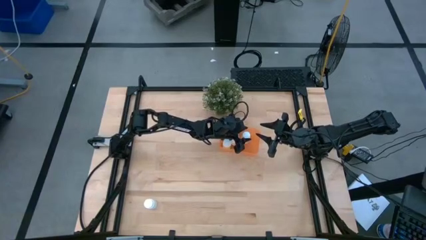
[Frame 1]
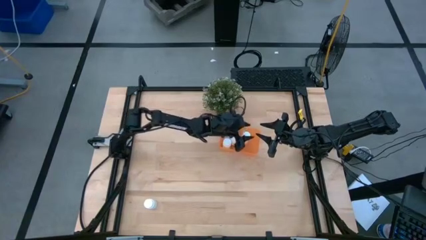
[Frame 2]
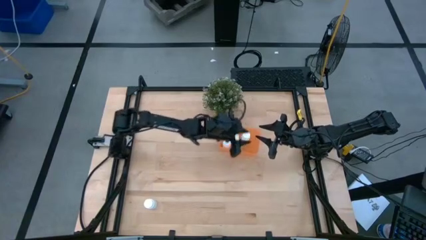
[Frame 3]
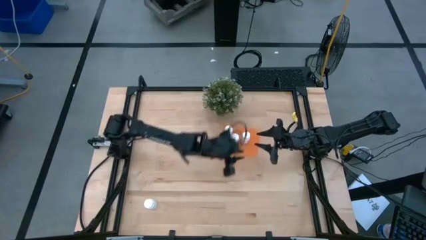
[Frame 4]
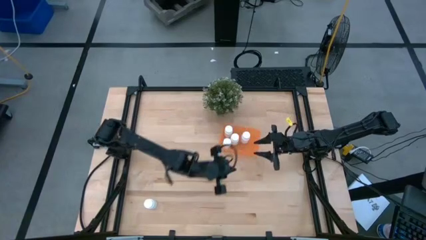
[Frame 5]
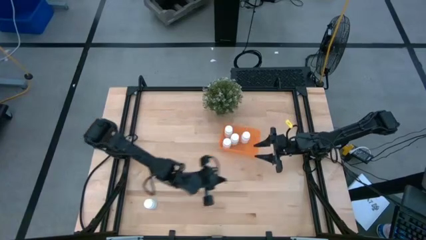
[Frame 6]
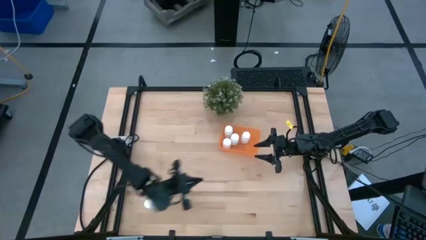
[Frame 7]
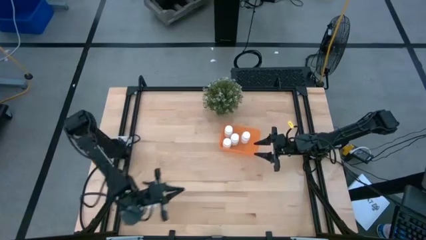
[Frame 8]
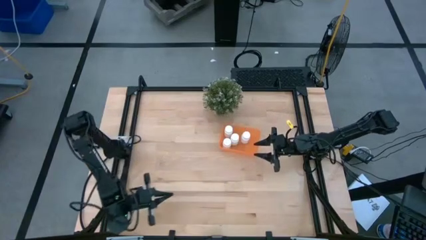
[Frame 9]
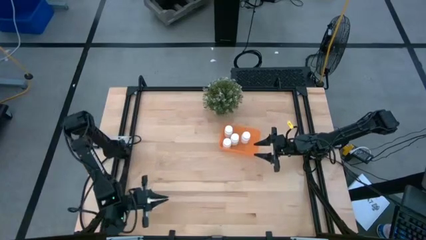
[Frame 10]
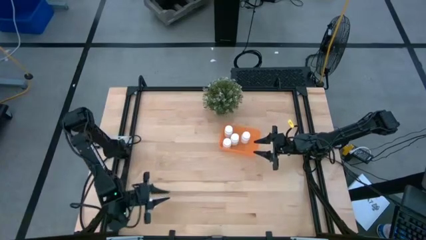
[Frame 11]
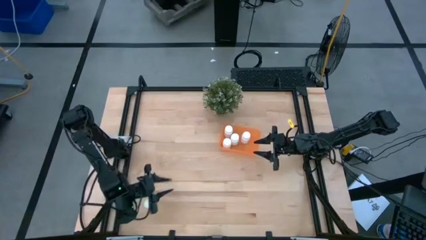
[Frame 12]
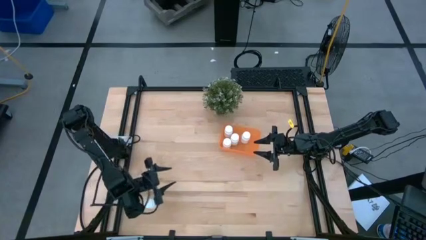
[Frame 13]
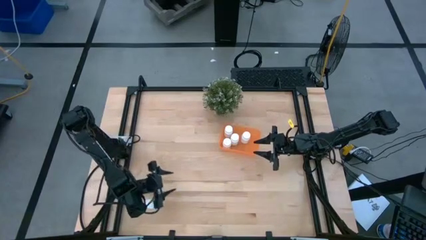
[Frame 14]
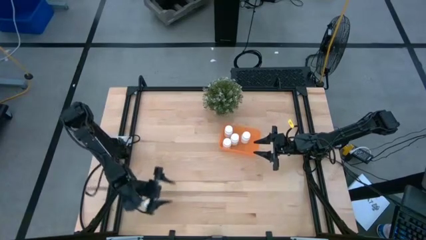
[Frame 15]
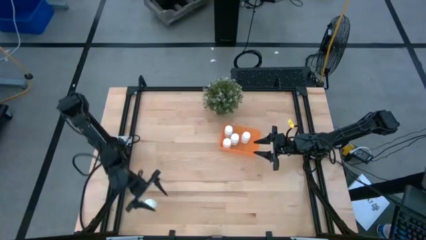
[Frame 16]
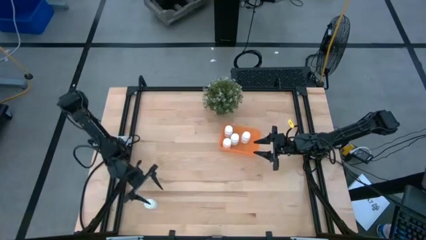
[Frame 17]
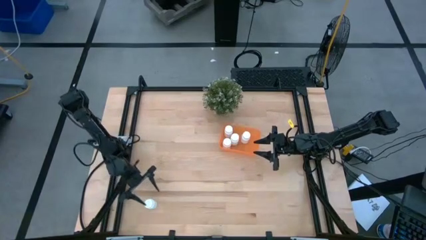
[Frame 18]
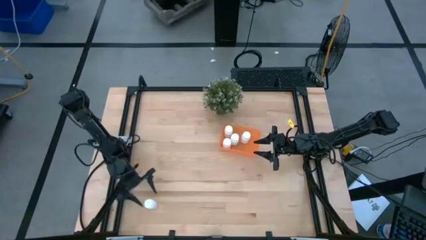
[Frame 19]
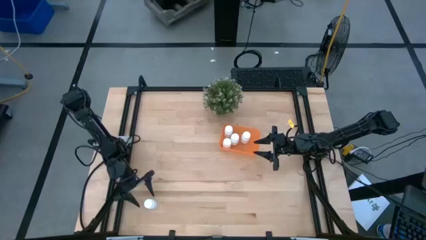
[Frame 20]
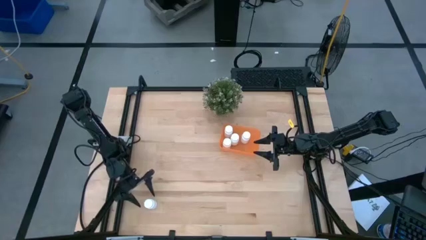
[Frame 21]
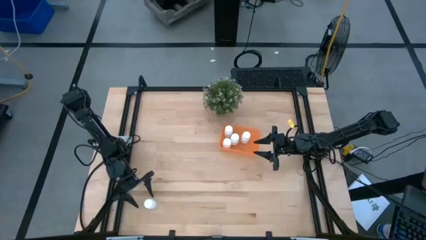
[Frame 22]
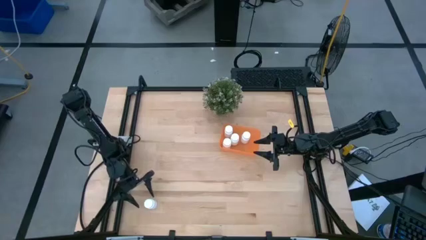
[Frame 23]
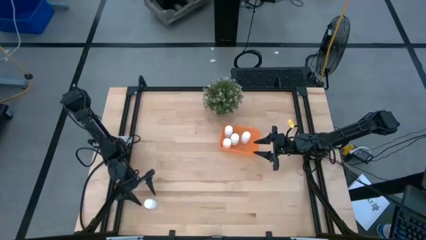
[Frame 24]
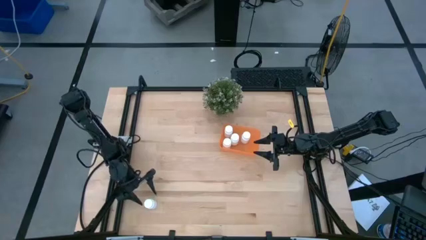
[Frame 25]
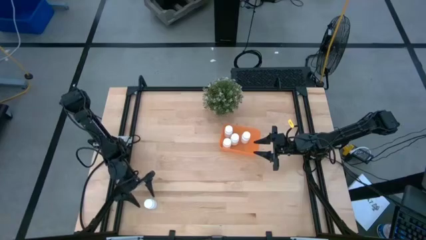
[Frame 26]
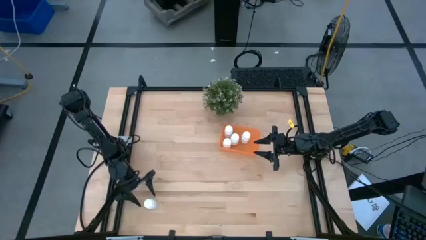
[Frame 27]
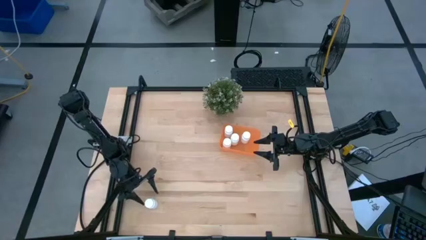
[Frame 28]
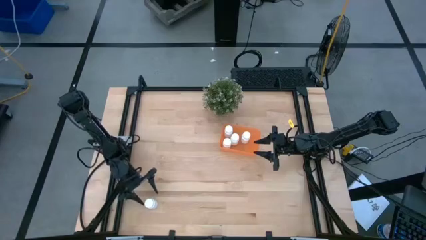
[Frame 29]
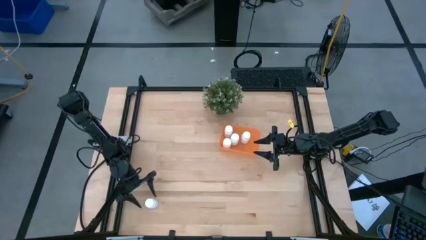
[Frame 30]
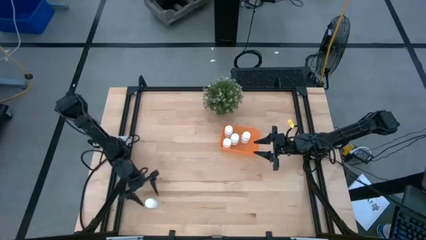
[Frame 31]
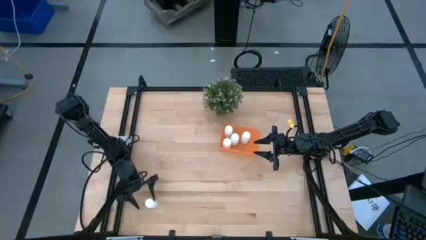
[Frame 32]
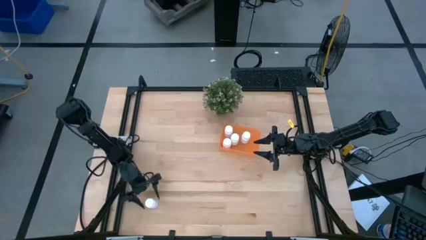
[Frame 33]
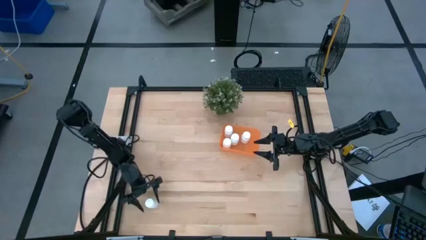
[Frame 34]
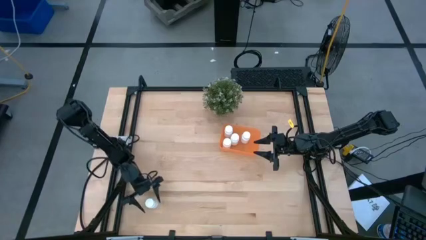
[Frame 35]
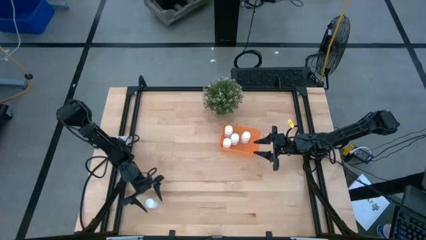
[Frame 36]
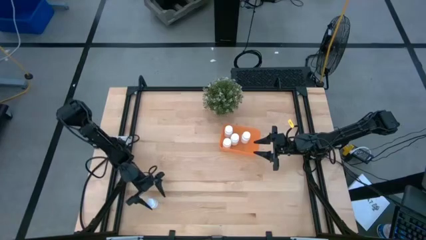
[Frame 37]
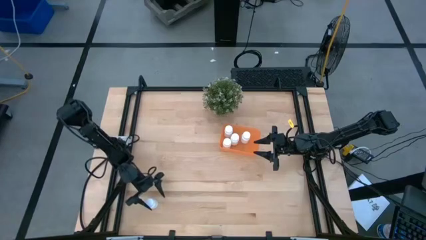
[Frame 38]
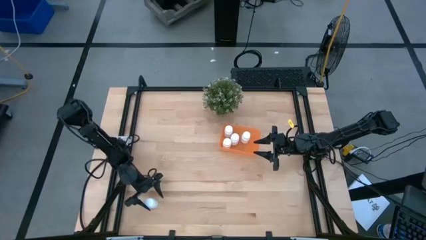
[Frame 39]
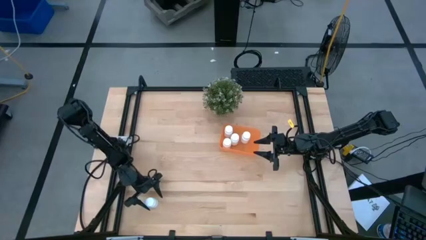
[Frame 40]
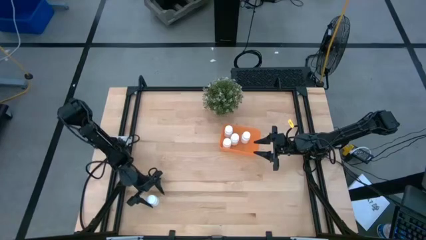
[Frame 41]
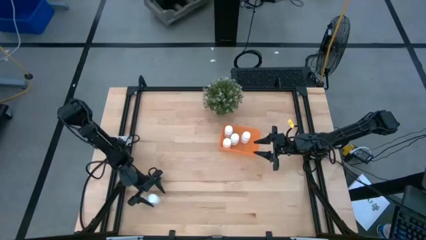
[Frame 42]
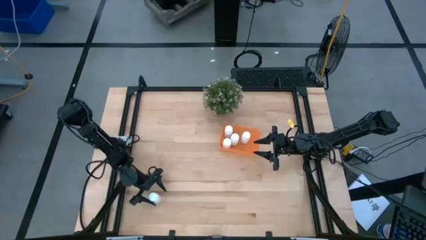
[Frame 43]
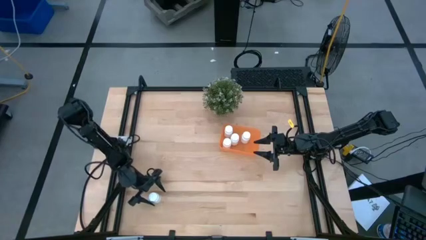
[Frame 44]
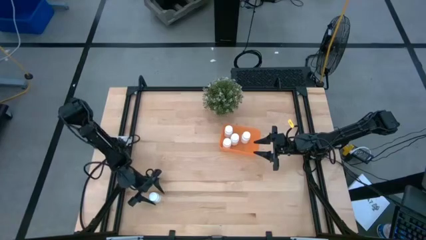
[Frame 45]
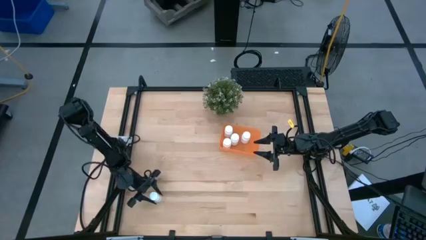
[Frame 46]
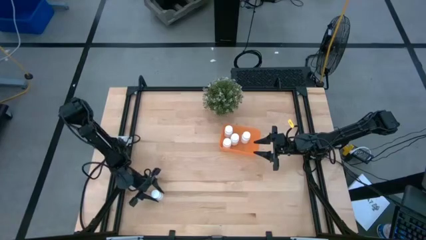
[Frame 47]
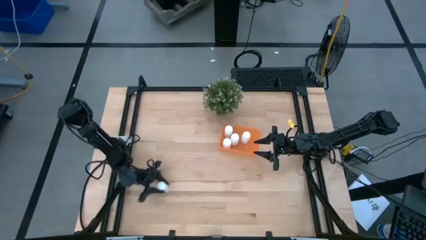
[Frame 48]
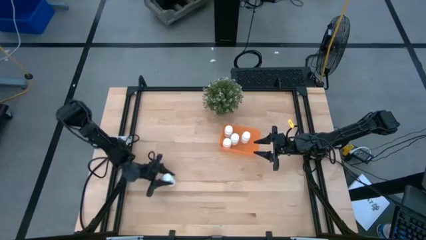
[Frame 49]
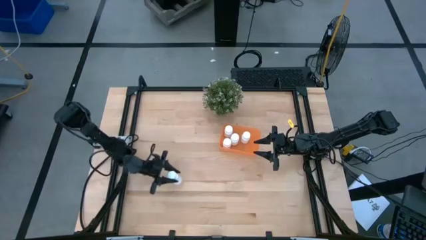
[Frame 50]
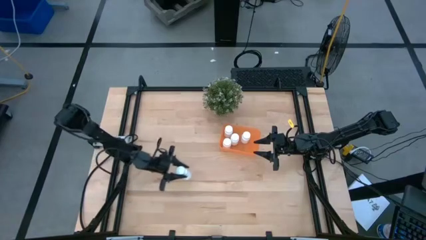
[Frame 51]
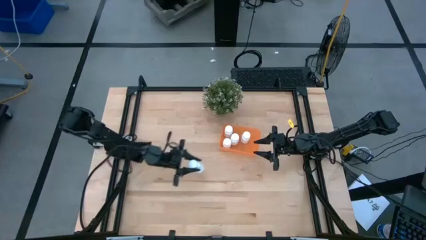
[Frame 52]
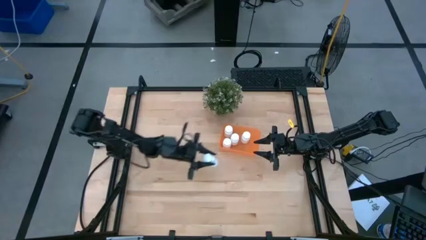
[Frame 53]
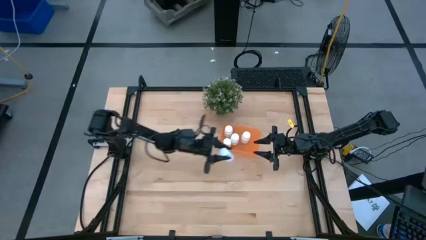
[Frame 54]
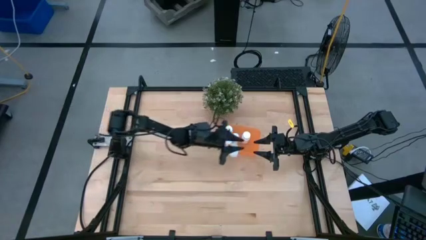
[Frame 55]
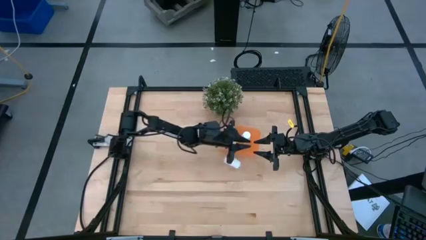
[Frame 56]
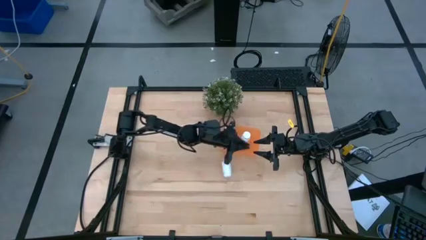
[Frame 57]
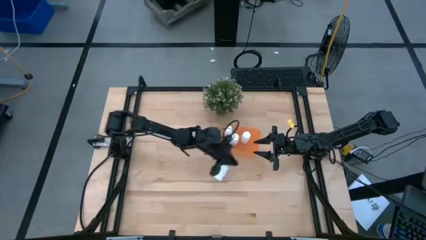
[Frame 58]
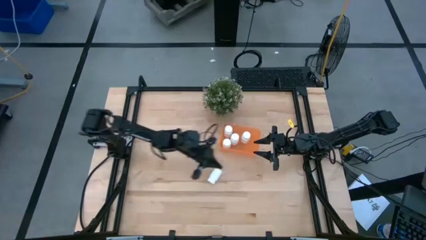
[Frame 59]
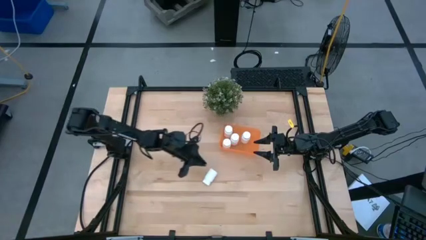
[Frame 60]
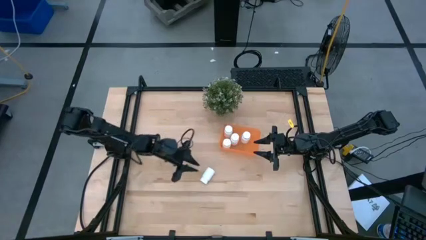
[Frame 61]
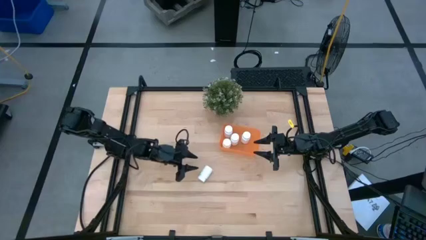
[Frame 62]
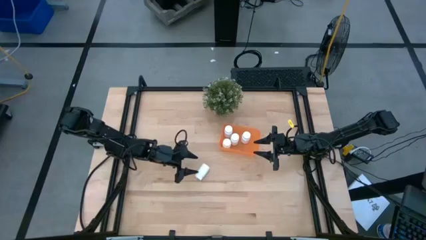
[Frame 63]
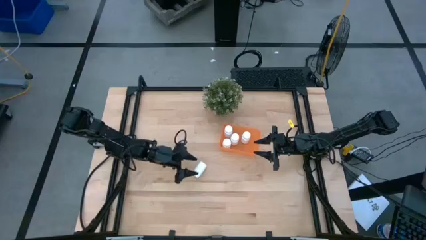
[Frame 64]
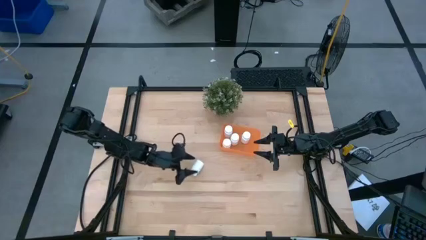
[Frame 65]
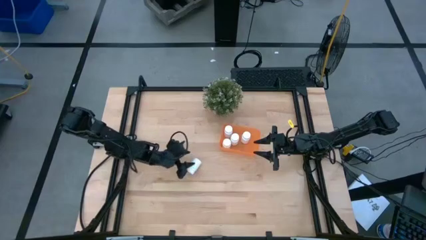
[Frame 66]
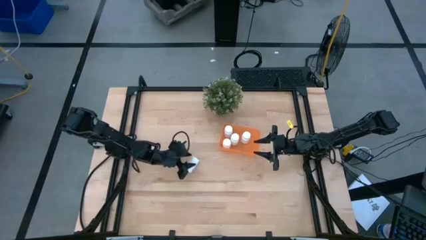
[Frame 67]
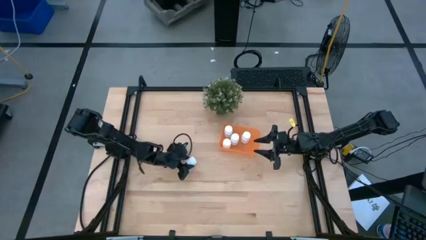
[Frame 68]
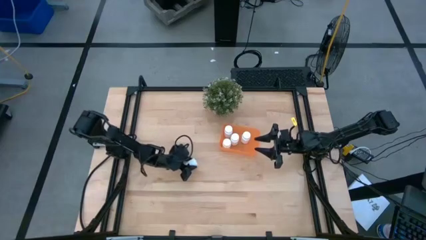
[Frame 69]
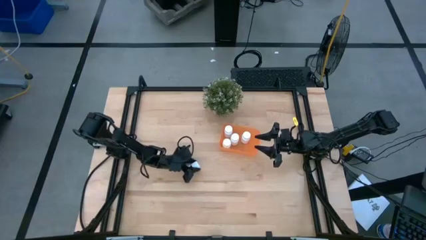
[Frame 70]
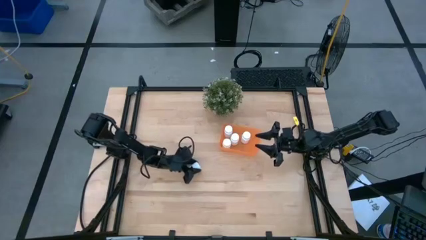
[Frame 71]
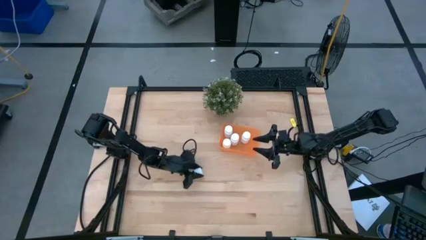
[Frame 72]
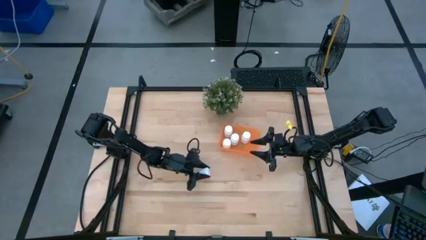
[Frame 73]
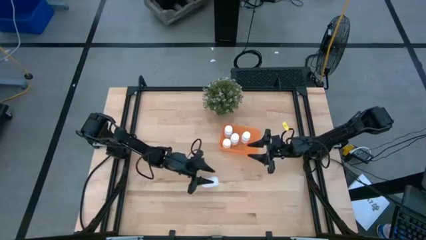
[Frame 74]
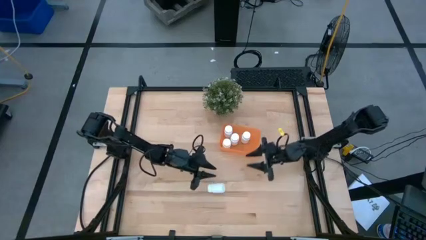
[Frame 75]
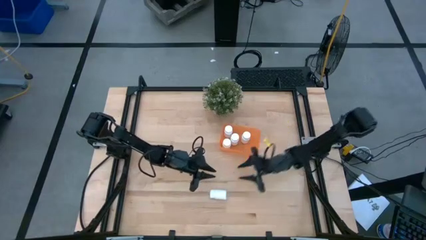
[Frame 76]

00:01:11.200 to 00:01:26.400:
Task: Pick and place pill bottles into a basket
Put the white pill bottle into the orange bin
